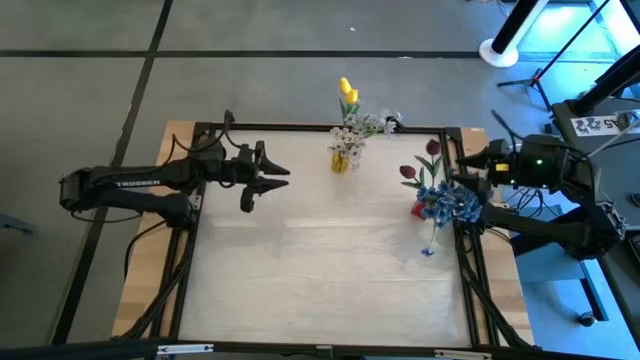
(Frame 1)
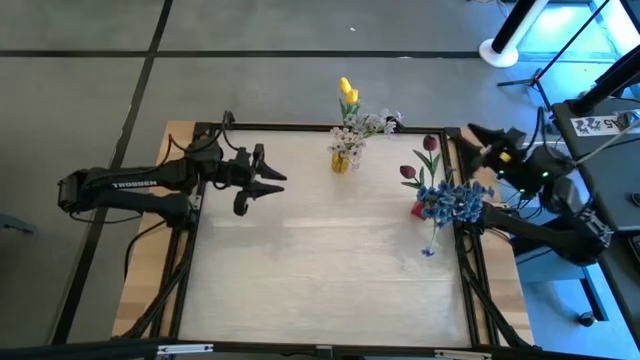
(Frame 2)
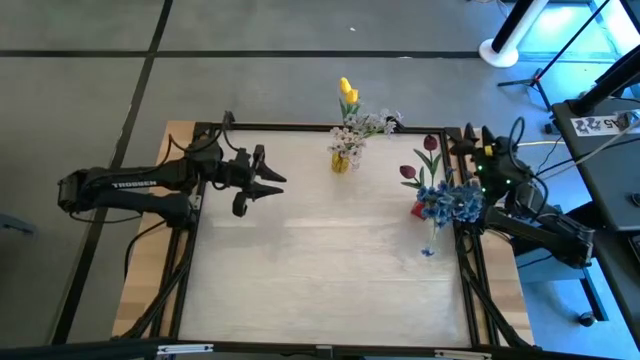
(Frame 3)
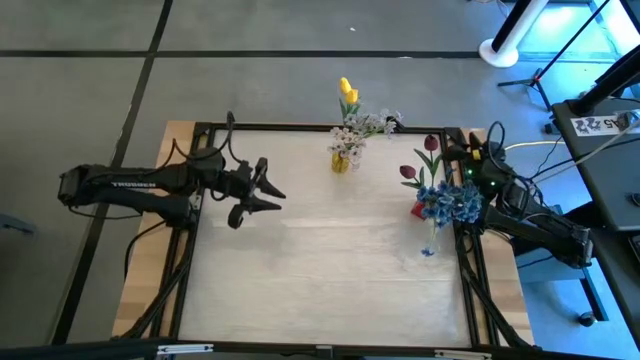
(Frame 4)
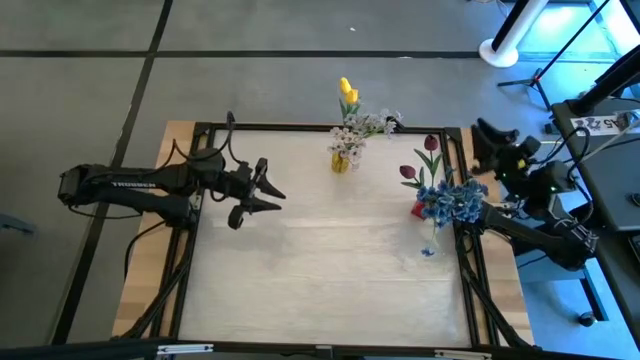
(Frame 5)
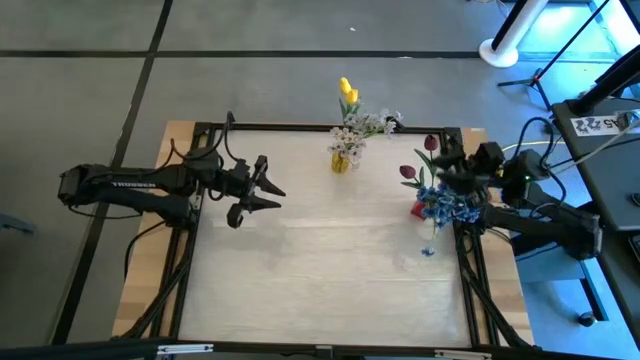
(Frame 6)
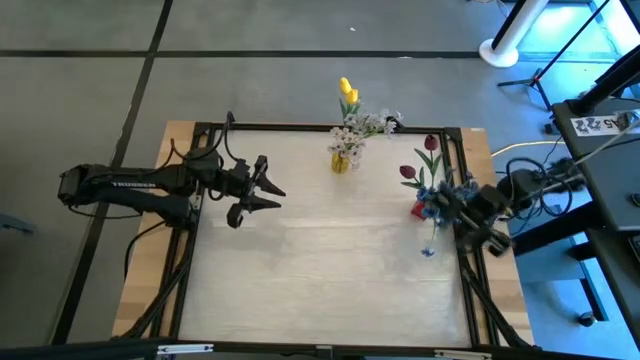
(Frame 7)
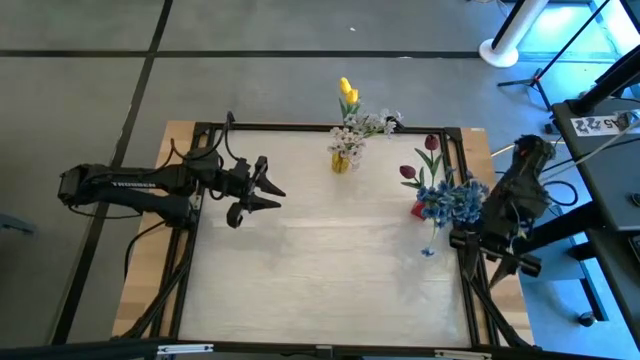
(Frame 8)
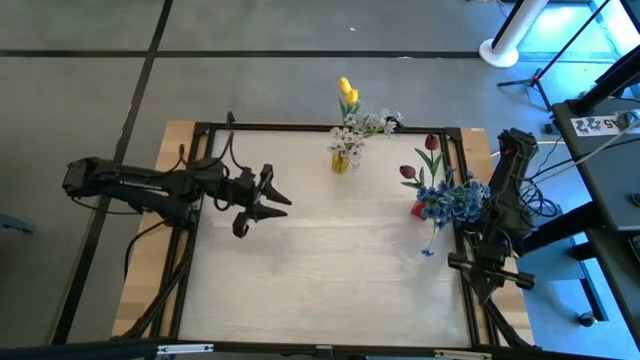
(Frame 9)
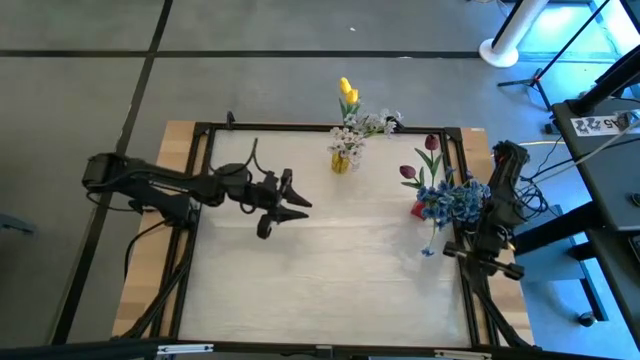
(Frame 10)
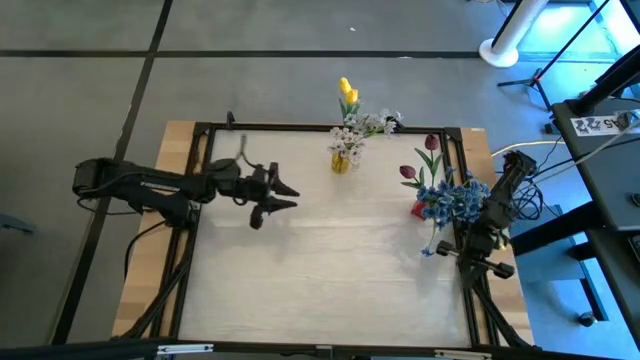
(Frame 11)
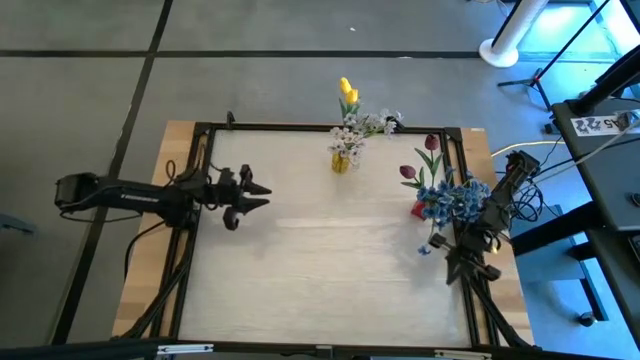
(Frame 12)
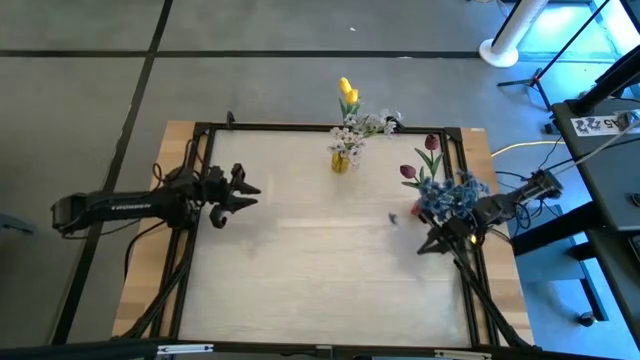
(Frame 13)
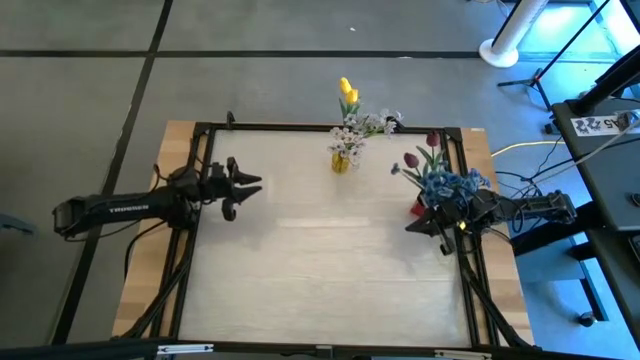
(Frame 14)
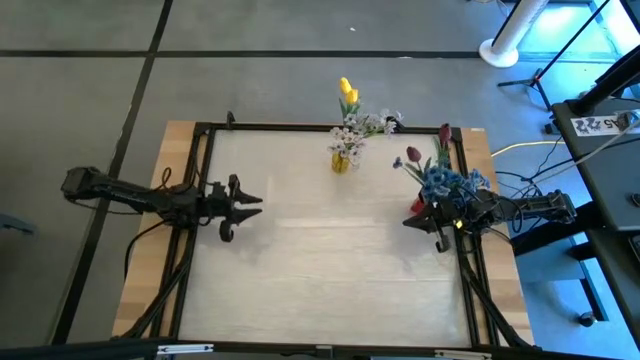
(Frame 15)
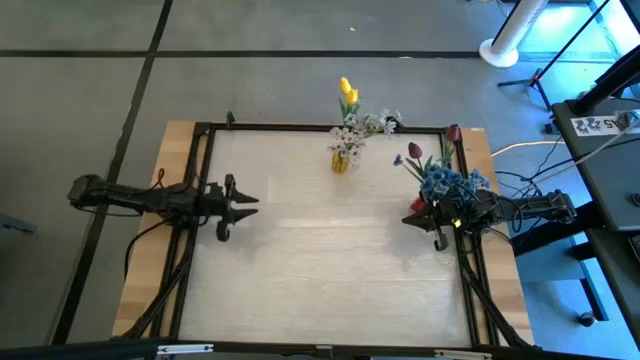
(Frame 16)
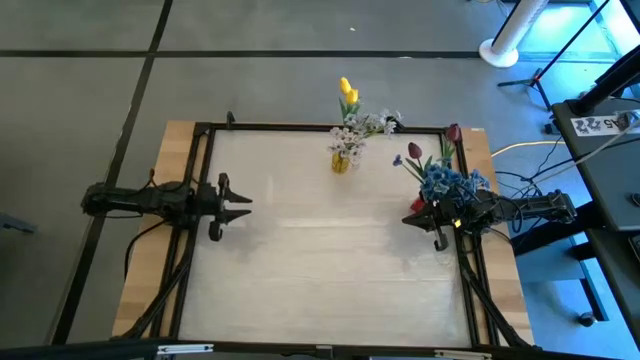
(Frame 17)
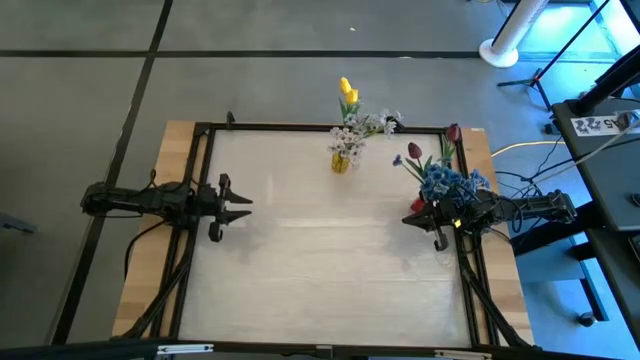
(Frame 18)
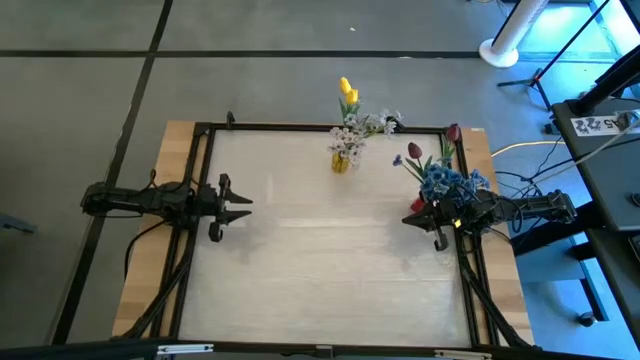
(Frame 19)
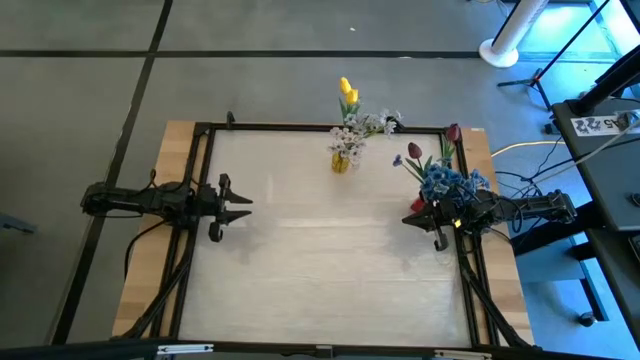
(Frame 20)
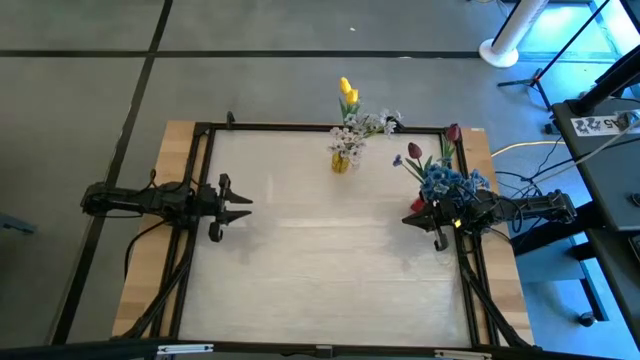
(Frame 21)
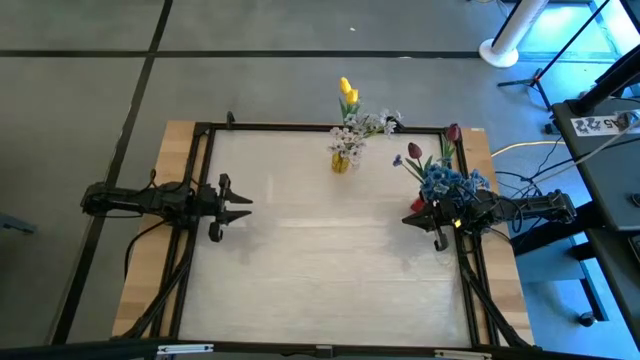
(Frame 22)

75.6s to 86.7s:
Task: Sort flowers into vase by color
Return to Home Position

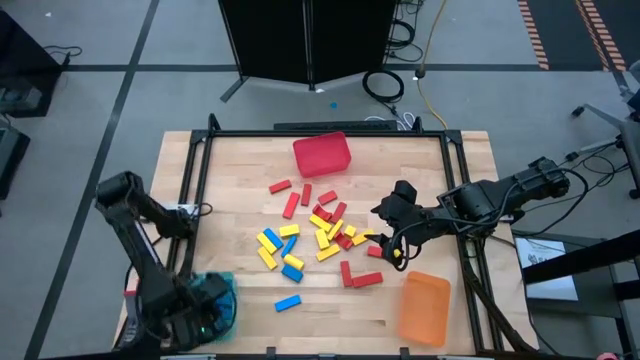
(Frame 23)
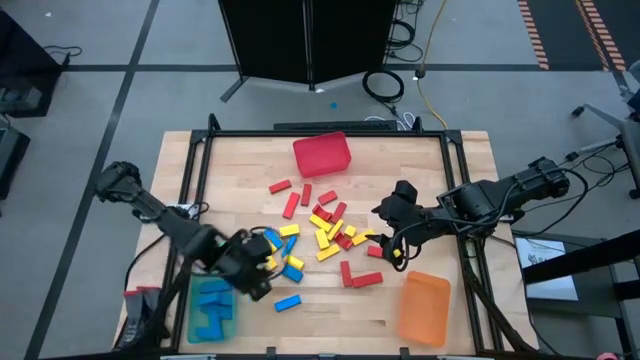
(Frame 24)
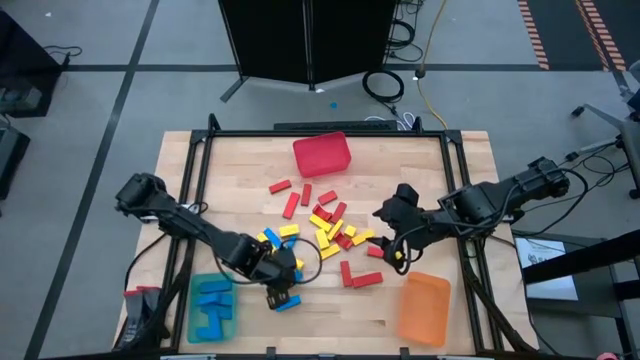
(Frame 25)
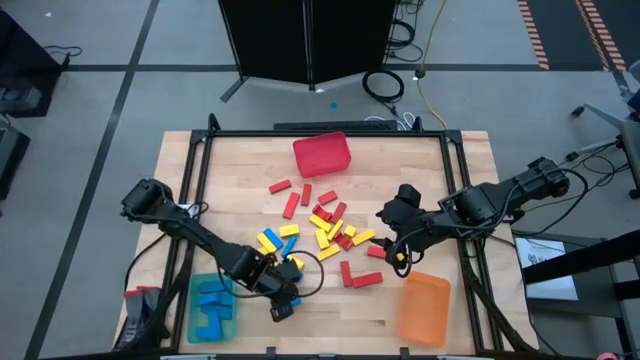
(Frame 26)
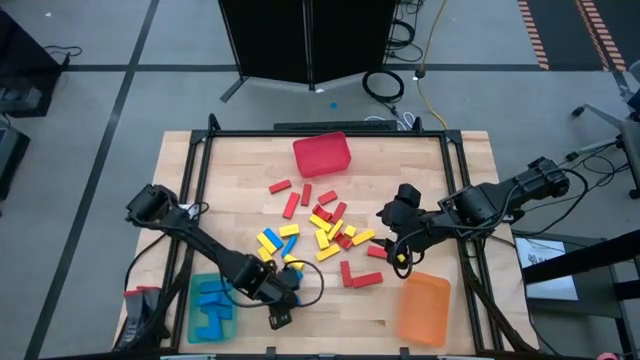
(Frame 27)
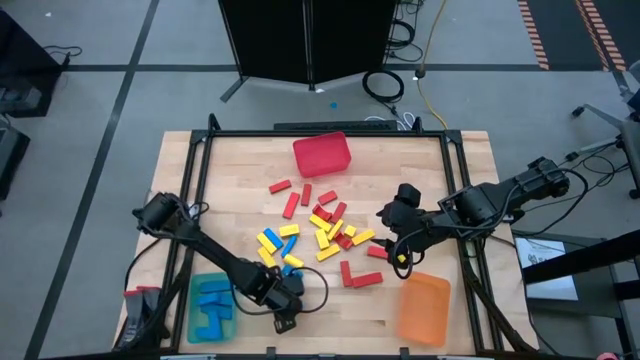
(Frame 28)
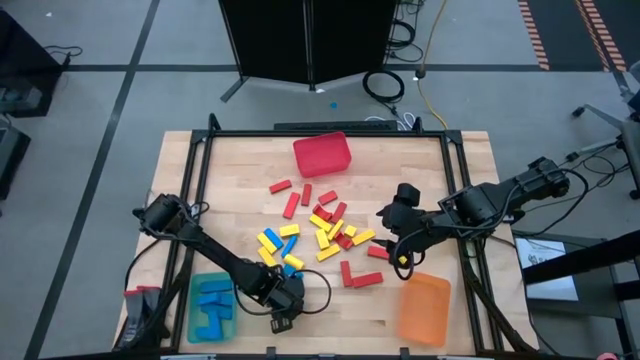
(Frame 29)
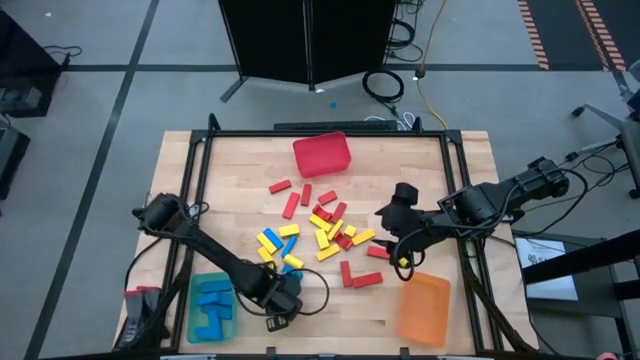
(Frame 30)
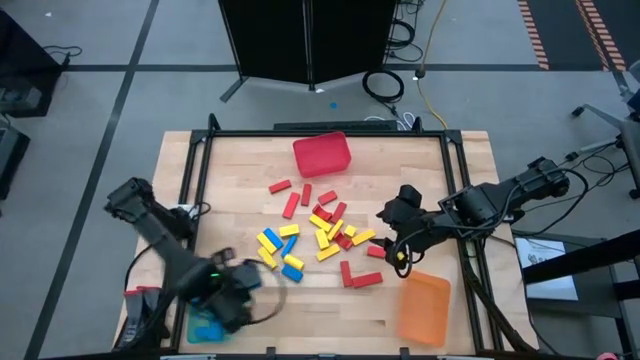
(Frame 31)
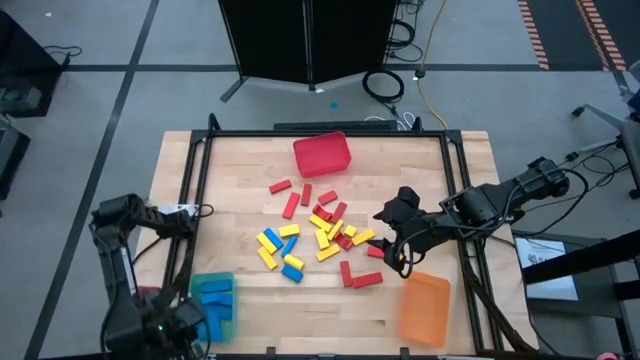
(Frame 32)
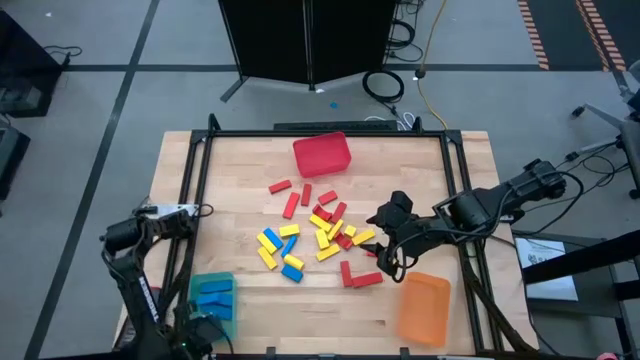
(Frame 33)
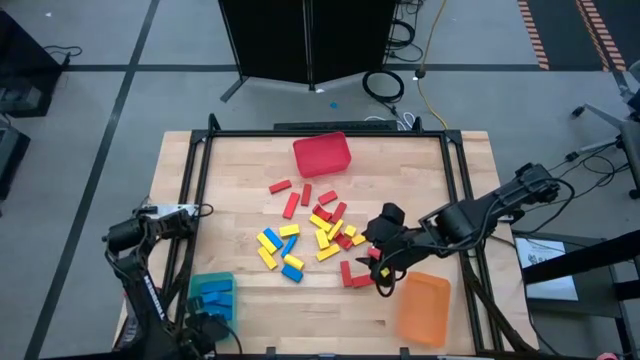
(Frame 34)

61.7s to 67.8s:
Task: Sort blocks
Put the blue block into the green bin

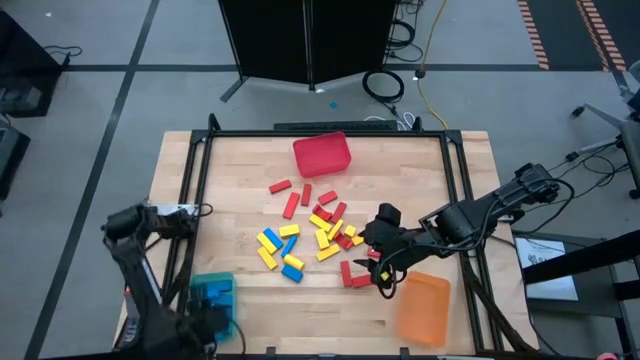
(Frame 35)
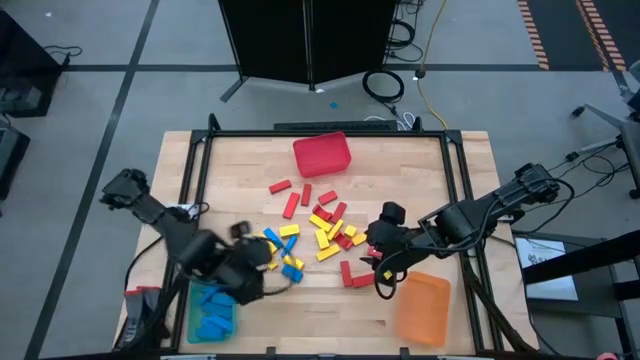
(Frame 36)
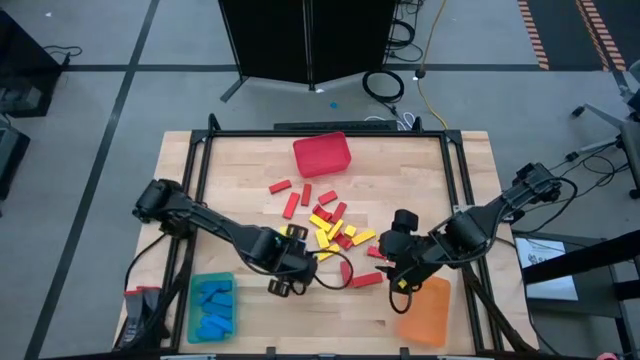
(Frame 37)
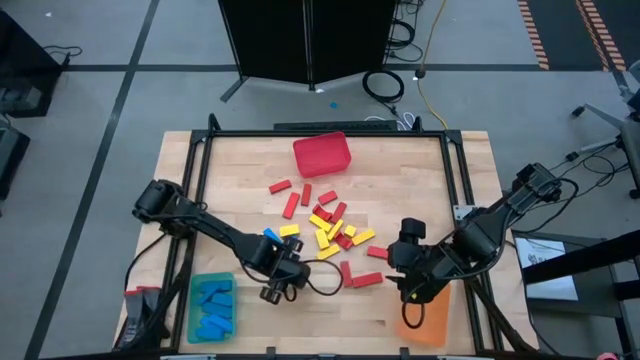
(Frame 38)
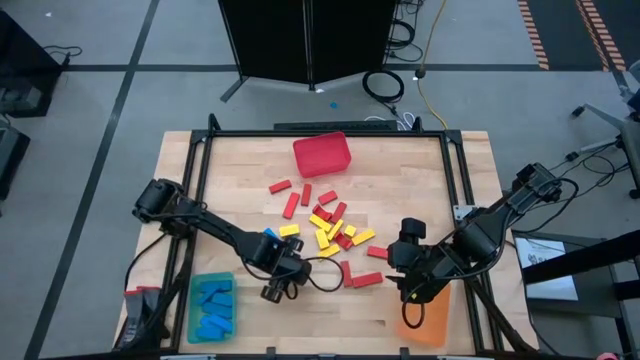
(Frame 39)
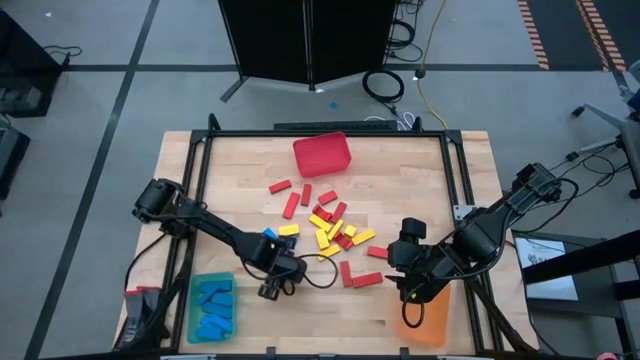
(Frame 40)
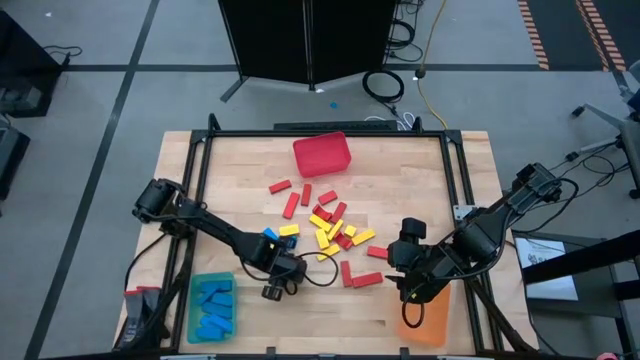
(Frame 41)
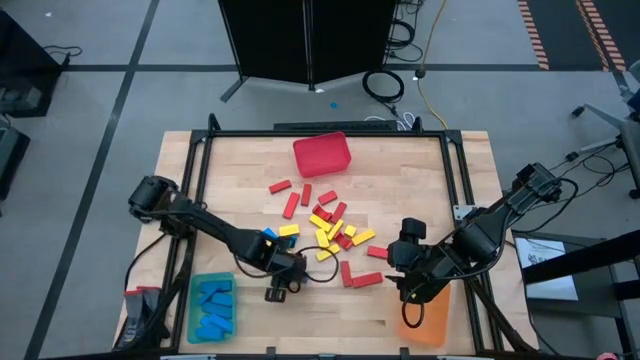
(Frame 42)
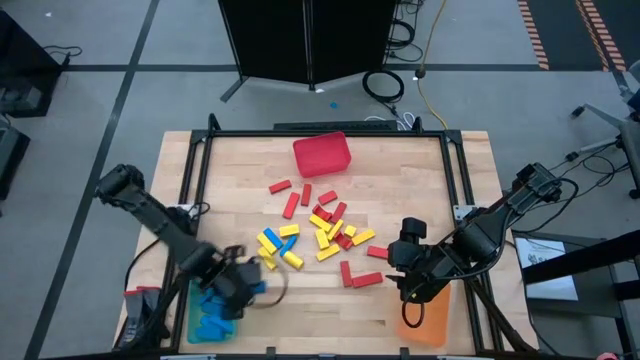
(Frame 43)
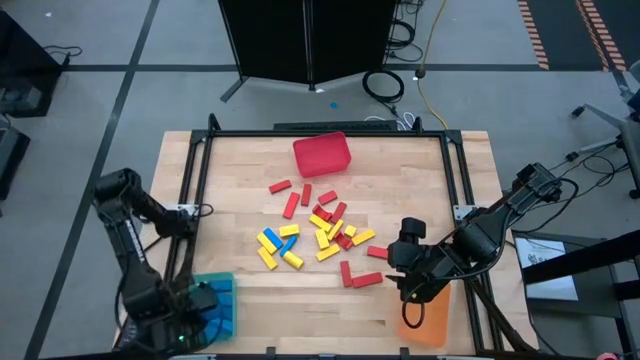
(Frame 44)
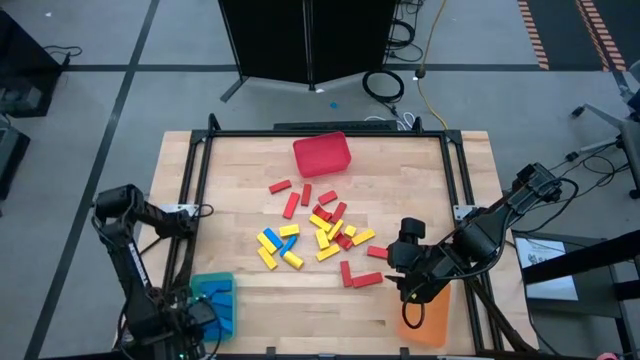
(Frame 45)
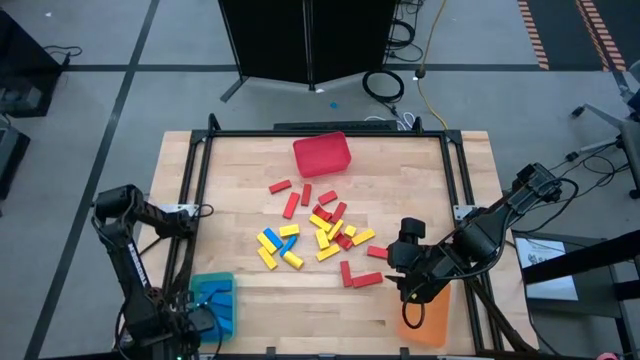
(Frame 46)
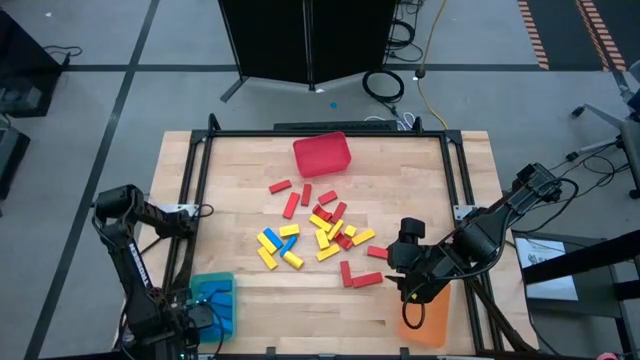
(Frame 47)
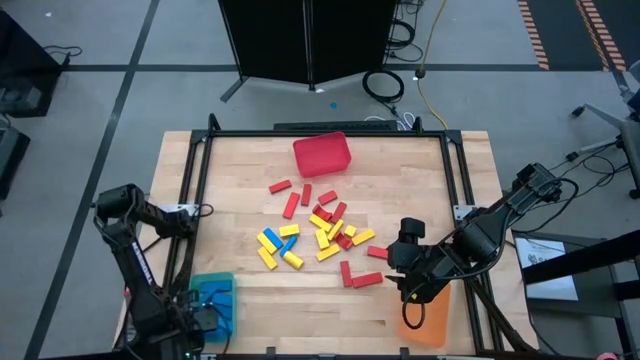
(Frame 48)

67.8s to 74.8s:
Put the blue block into the green bin
